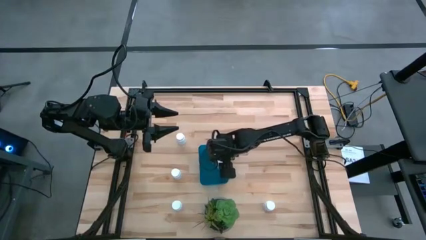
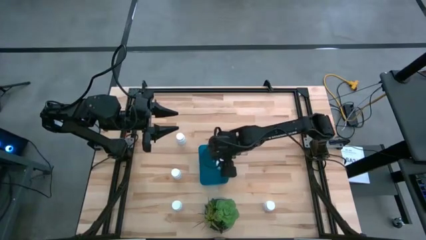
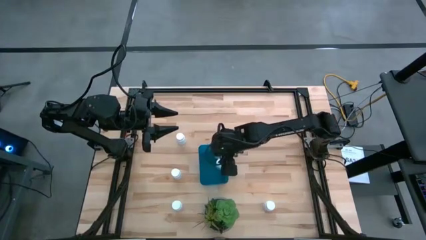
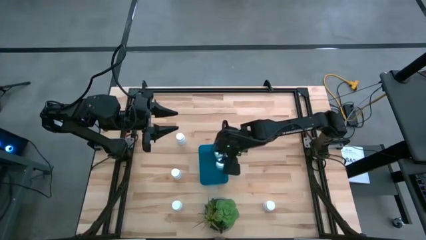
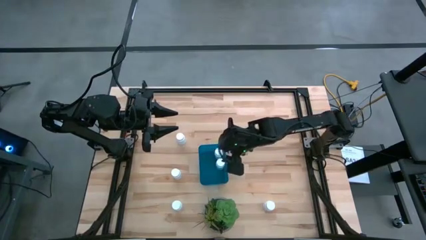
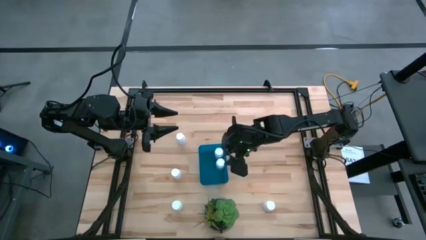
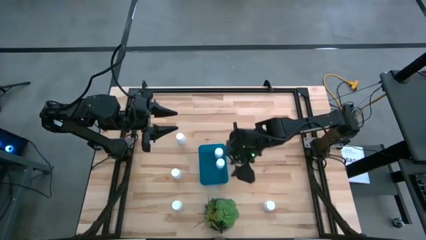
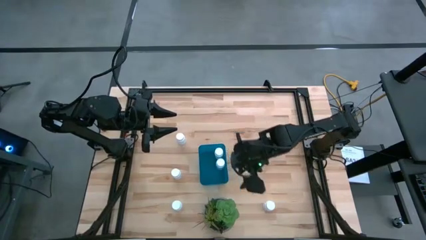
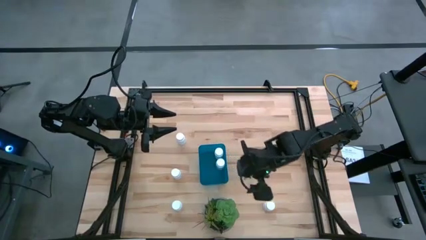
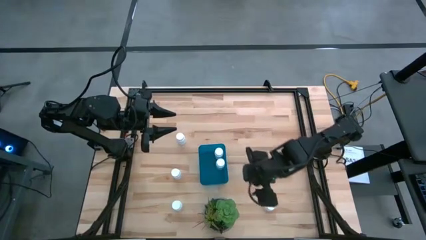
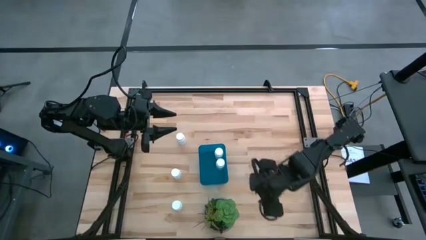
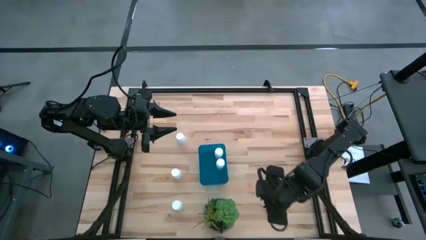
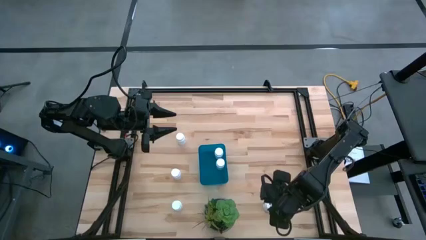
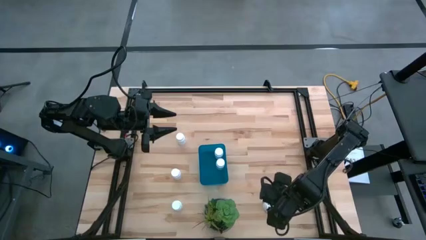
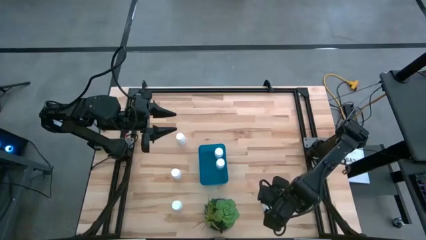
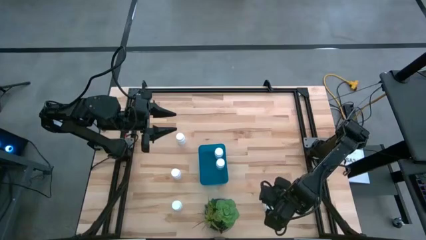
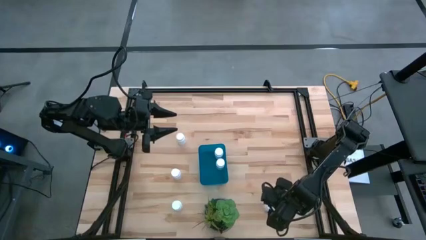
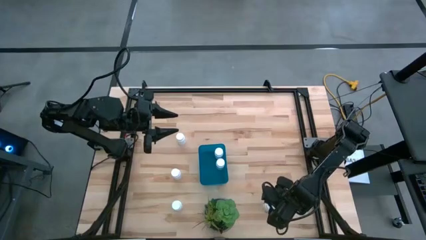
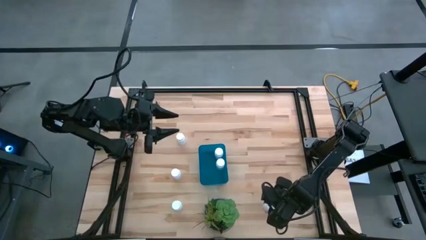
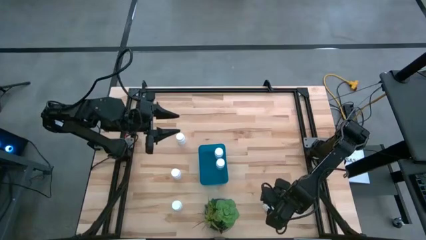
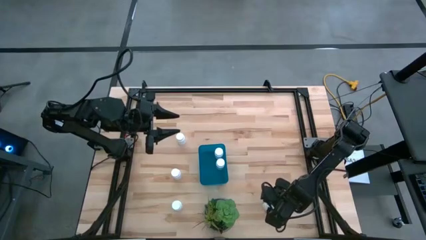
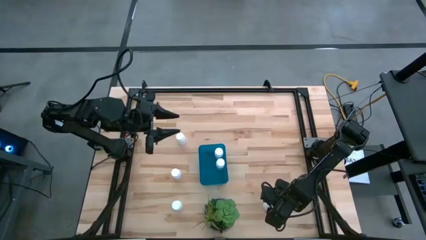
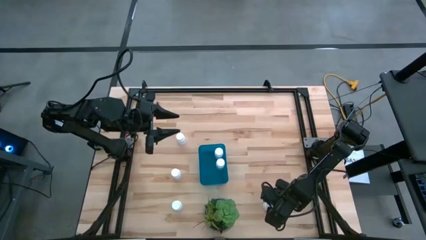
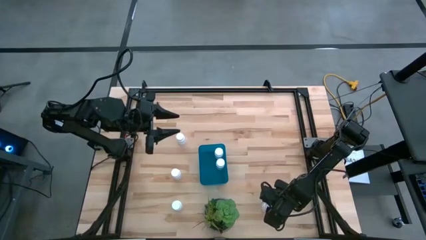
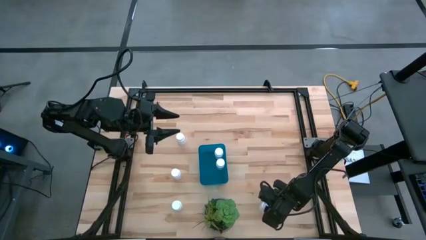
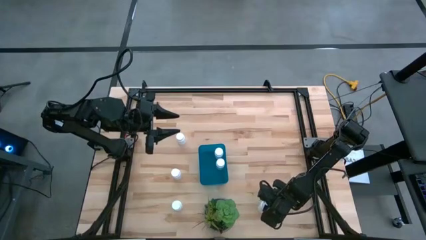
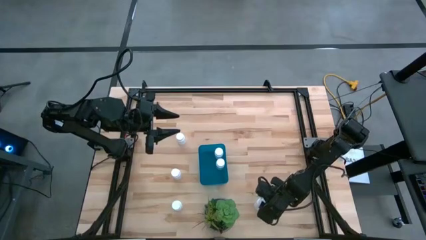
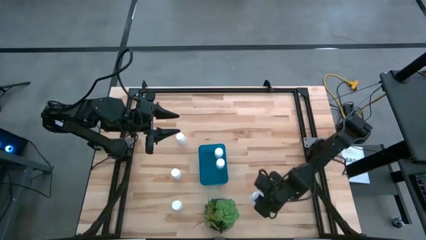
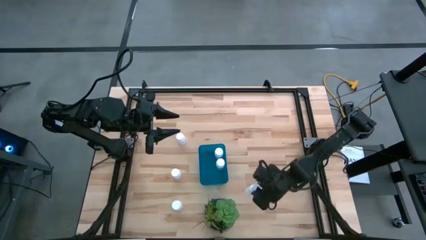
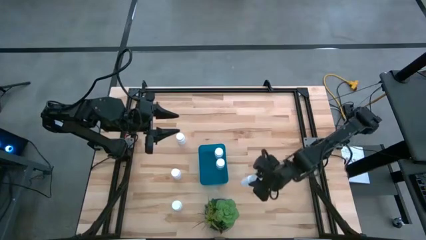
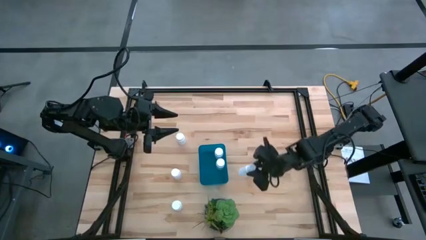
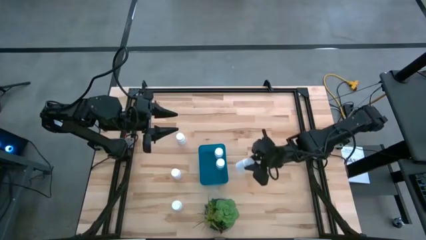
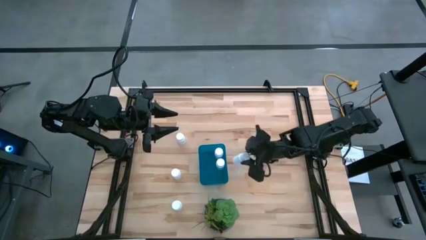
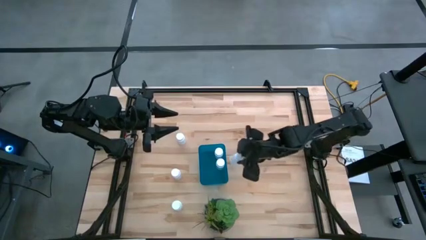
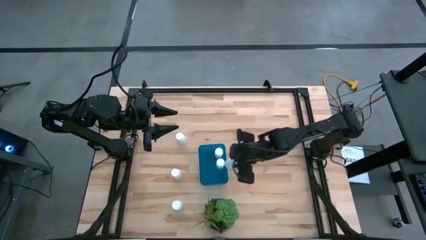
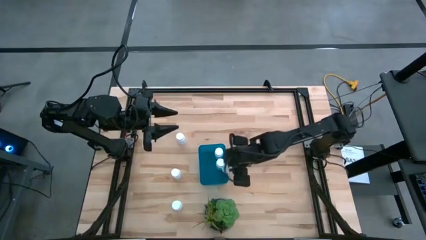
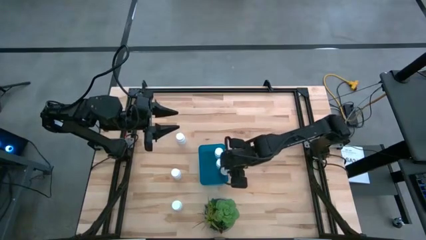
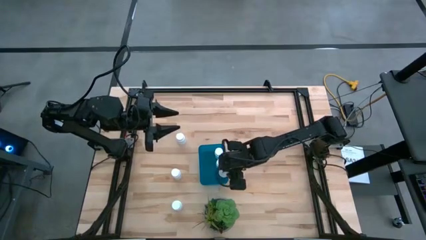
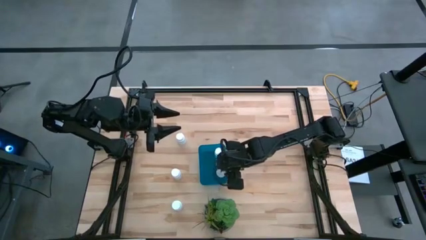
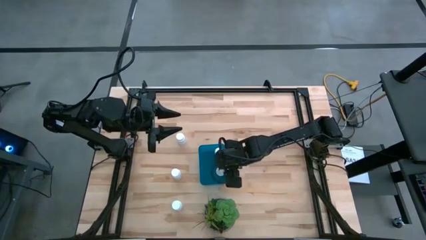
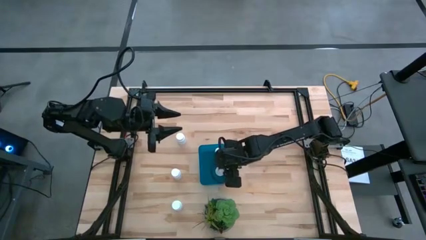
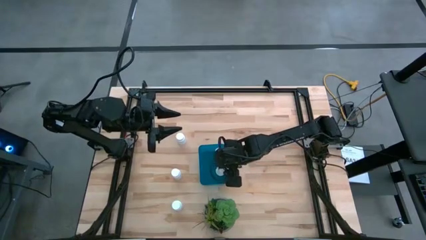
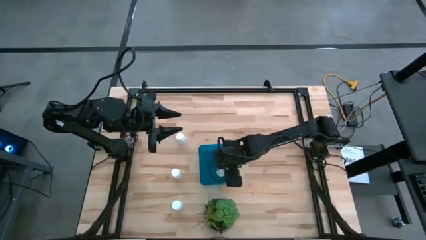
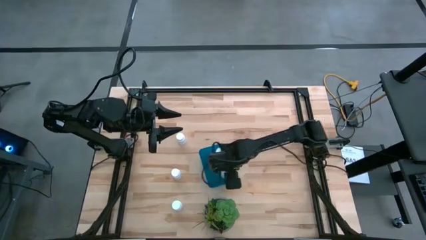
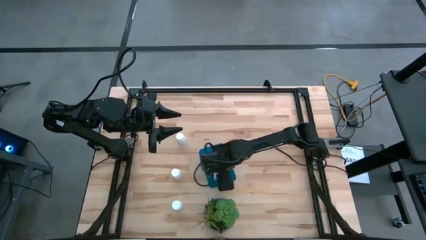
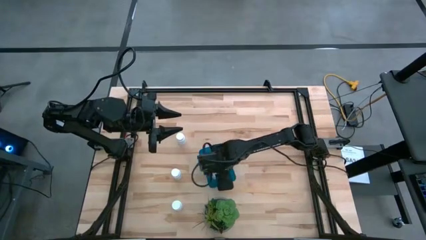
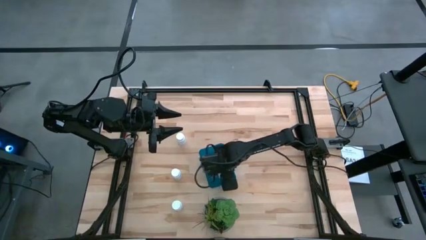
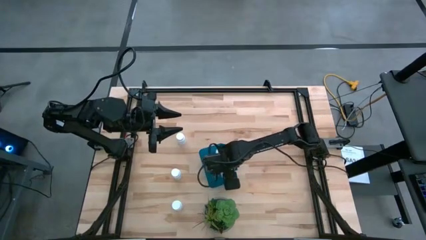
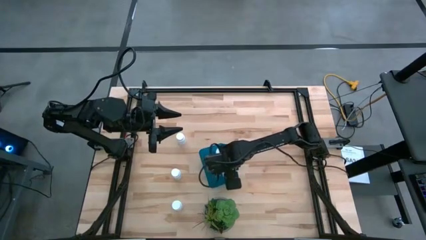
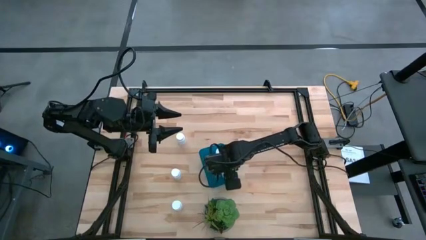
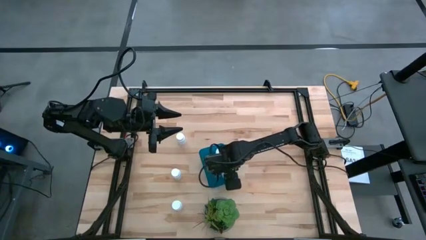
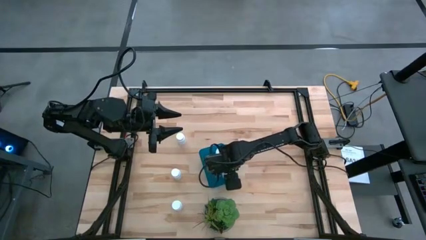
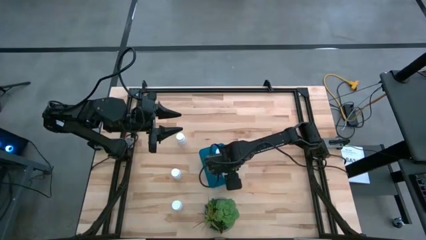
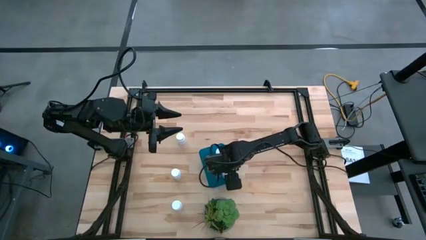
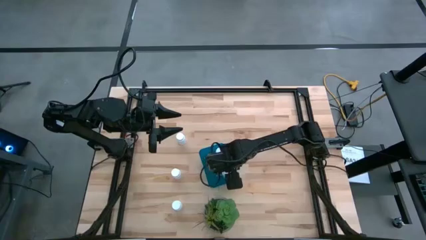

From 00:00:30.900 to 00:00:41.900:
Task: Pick and place pill bottles into a basket
Put the medicine bottle into the container
